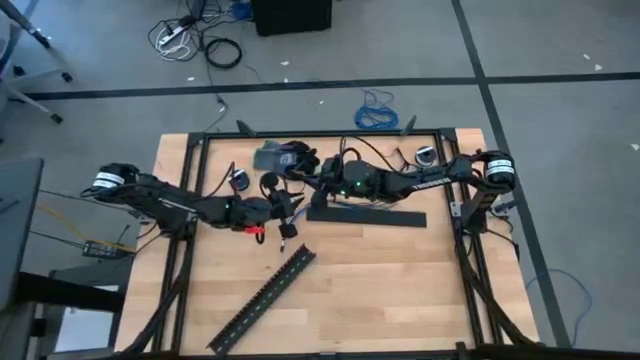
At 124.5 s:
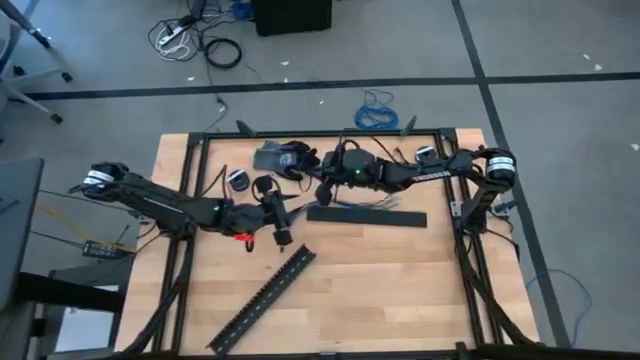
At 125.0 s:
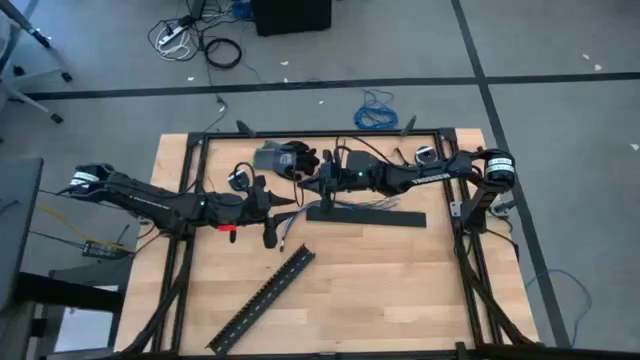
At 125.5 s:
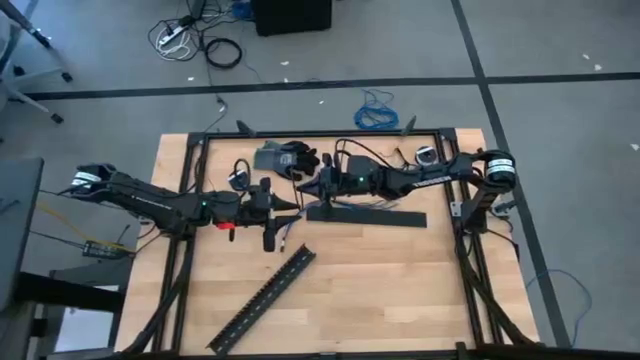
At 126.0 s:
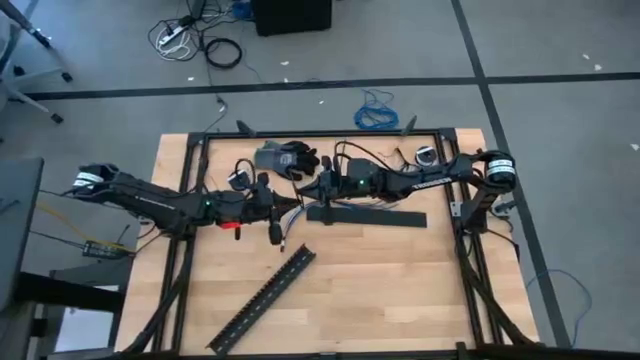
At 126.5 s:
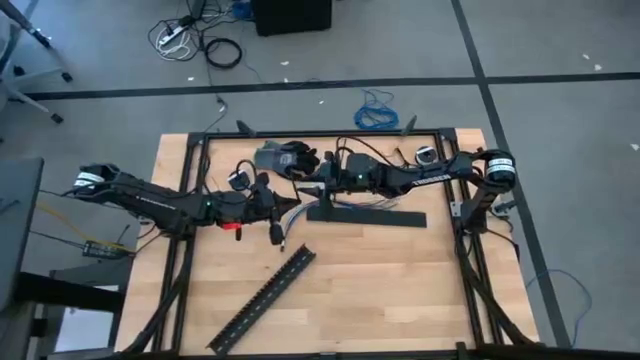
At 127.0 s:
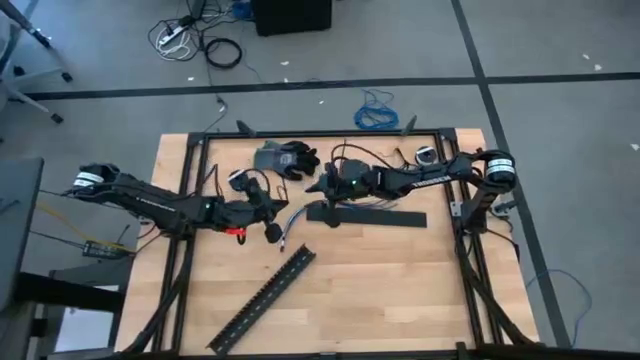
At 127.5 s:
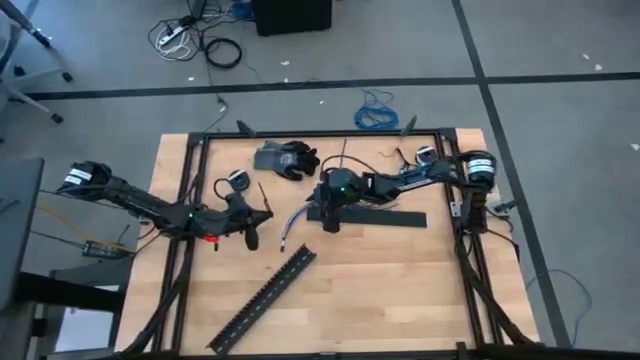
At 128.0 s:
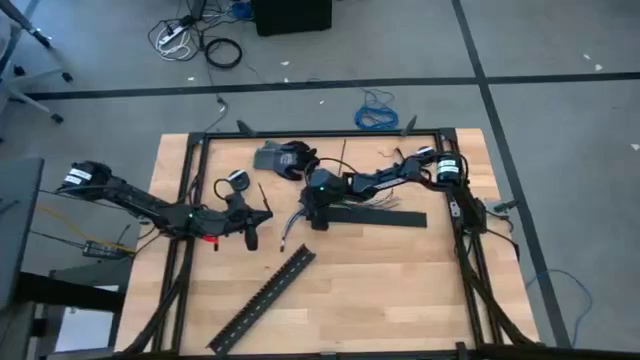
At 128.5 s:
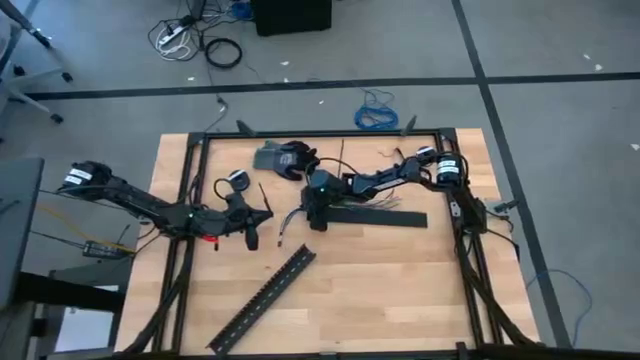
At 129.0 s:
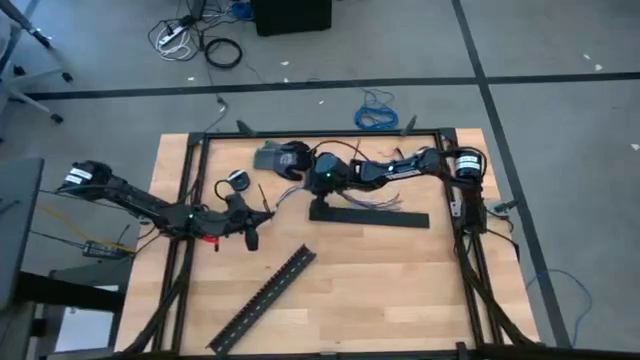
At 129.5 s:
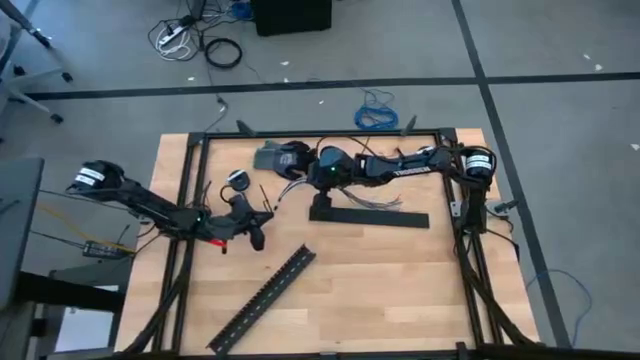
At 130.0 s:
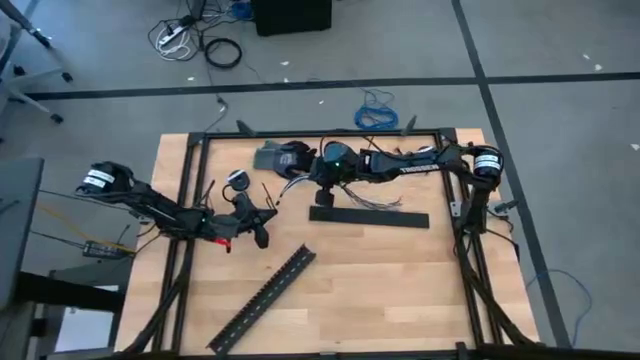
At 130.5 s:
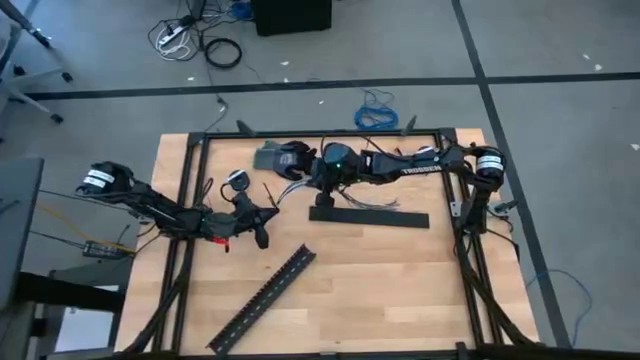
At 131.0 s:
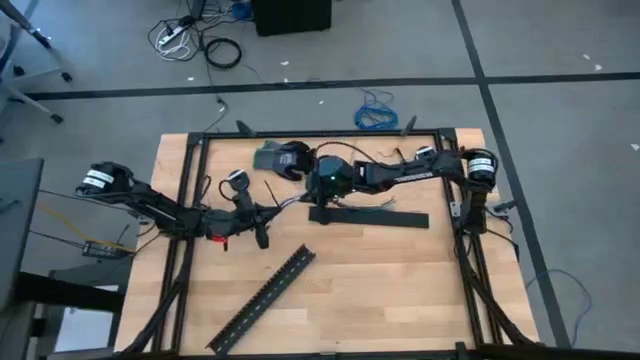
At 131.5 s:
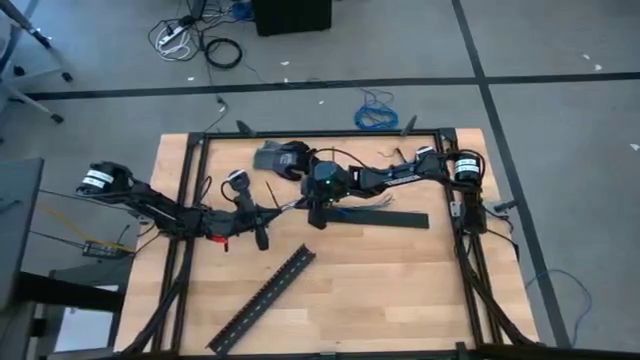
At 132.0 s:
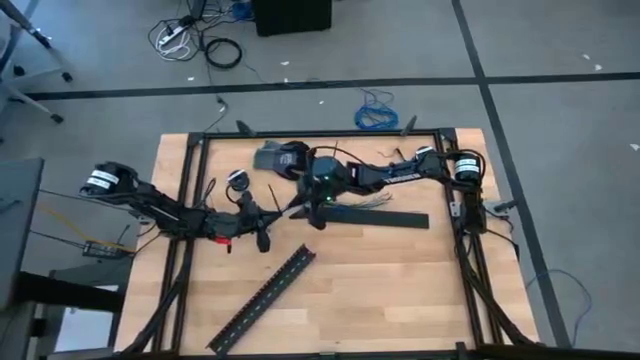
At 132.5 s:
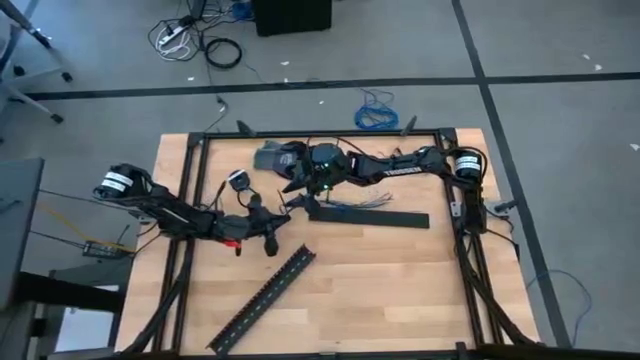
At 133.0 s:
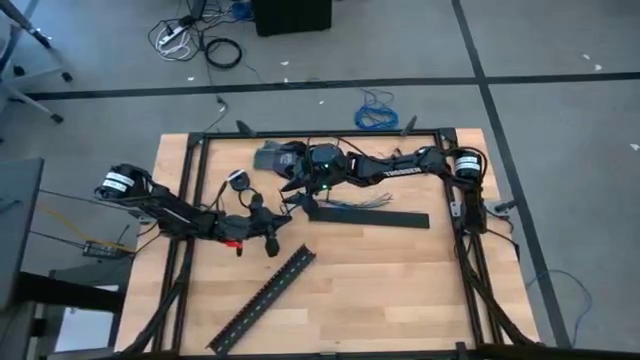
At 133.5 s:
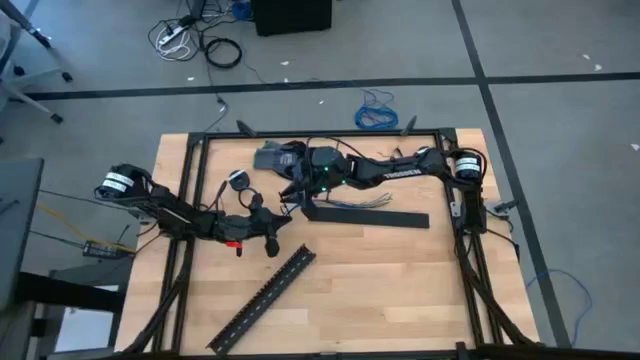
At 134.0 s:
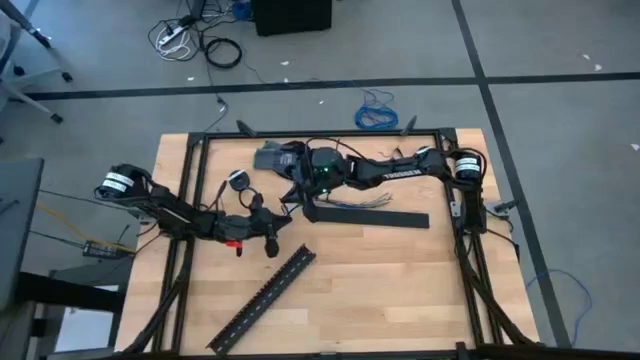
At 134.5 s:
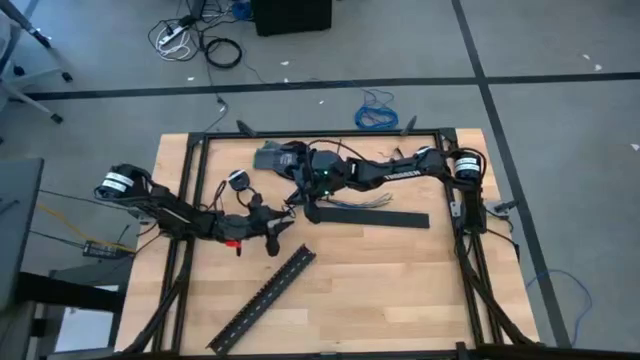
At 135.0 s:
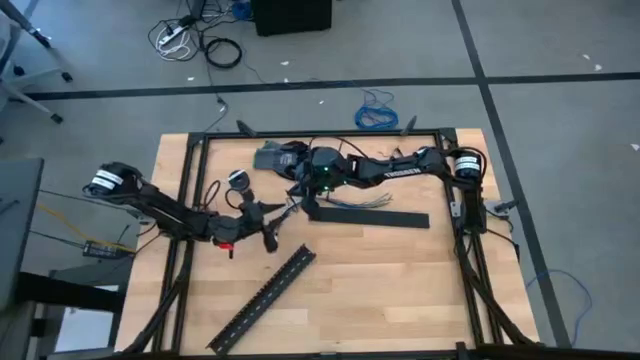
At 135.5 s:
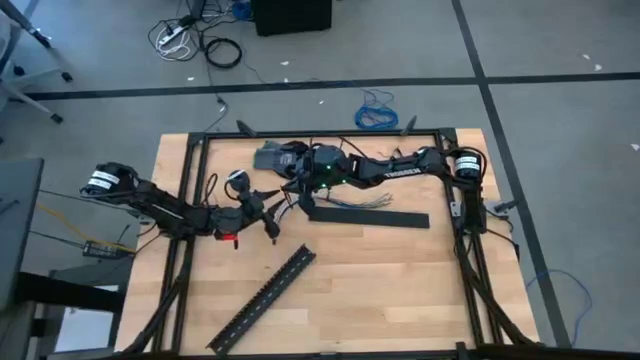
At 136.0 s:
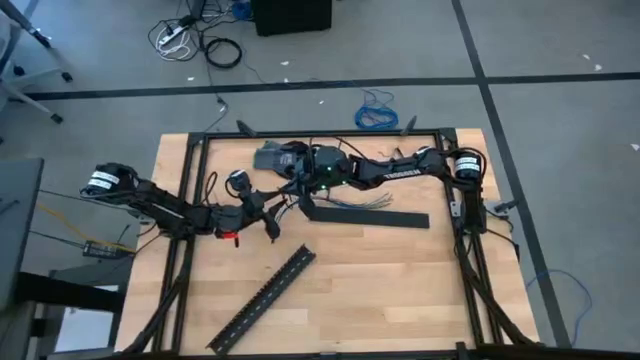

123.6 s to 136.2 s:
Task: Ziptie cables
Wrap the cable wires with the black zip tie

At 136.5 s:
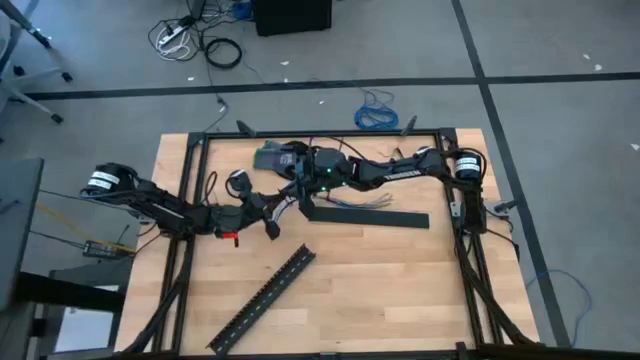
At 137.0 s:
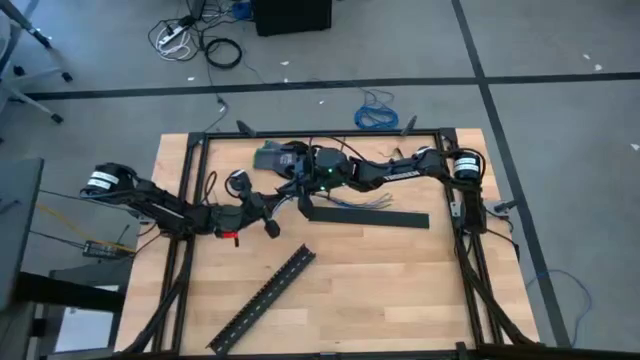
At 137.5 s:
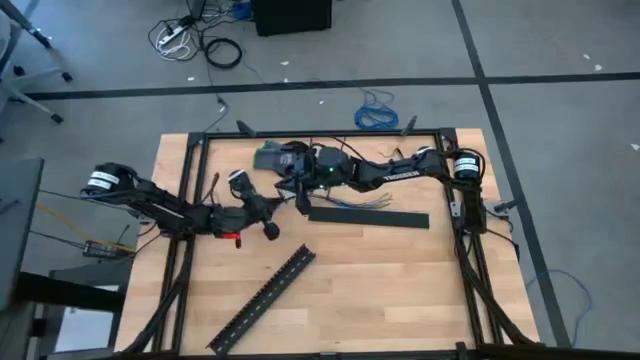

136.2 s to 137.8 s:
Wrap the cable wires with the black zip tie

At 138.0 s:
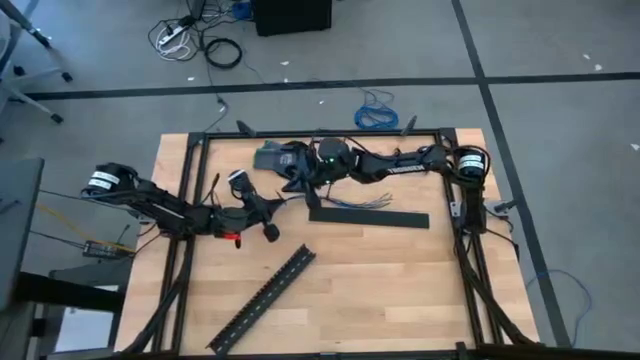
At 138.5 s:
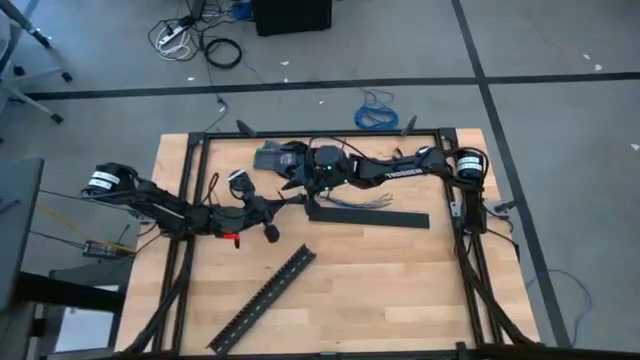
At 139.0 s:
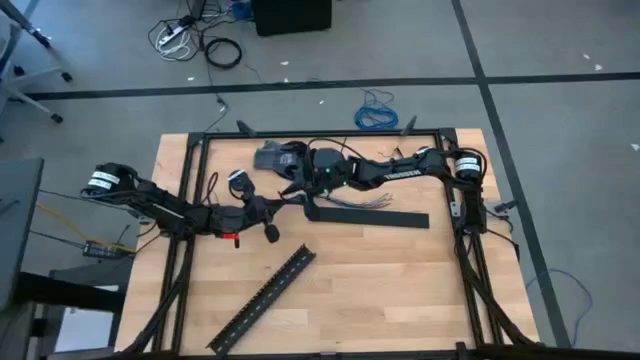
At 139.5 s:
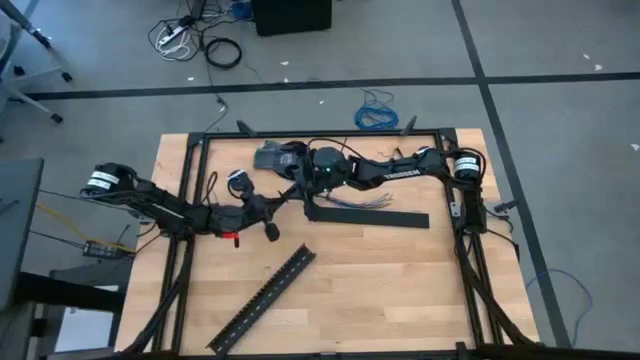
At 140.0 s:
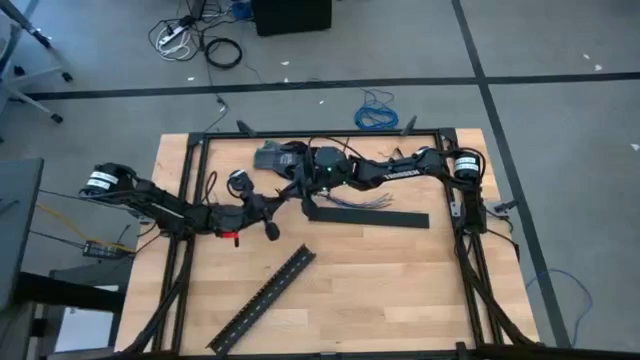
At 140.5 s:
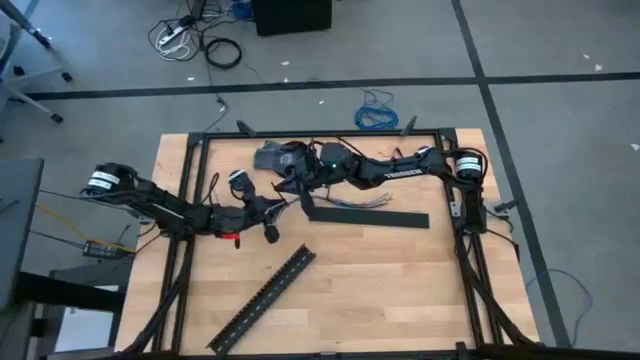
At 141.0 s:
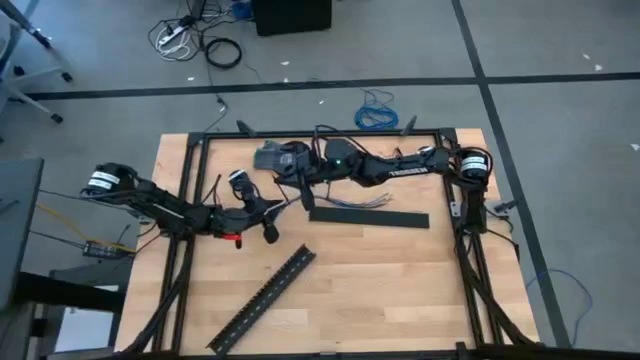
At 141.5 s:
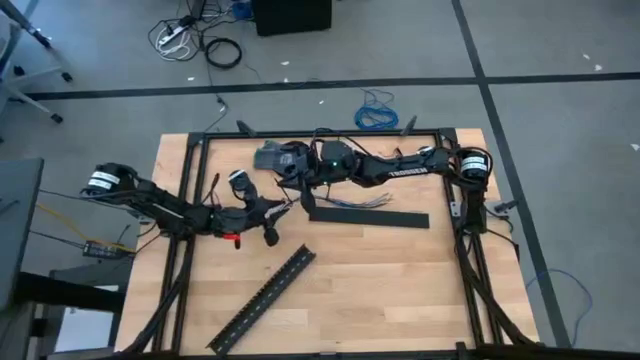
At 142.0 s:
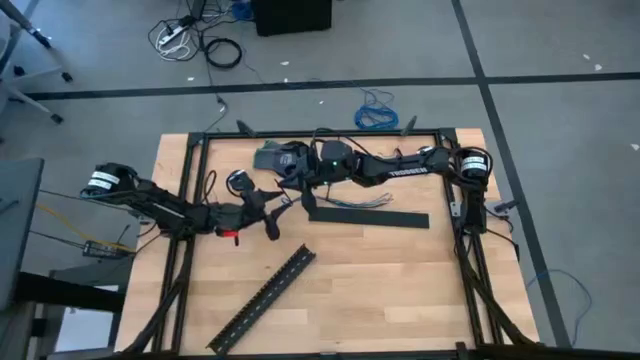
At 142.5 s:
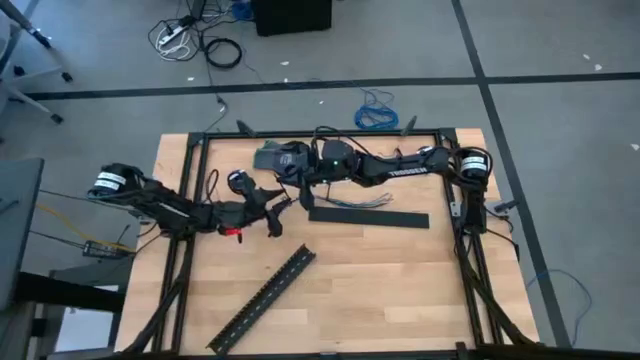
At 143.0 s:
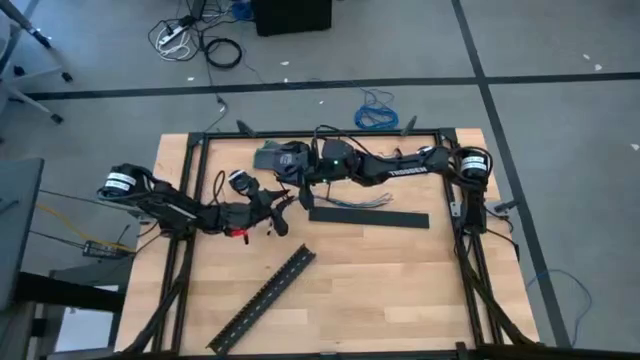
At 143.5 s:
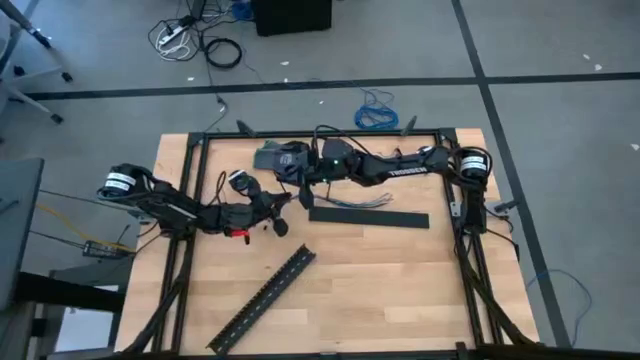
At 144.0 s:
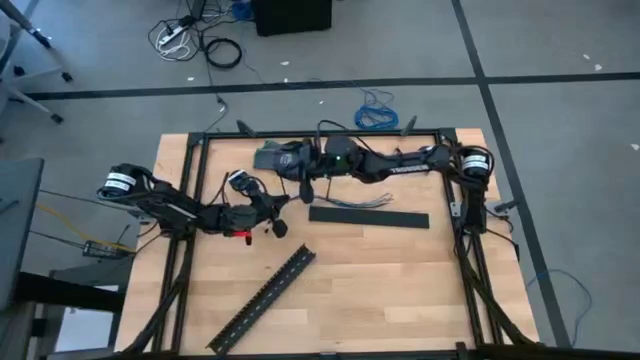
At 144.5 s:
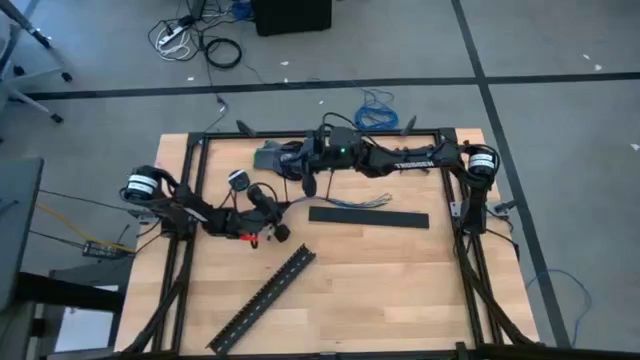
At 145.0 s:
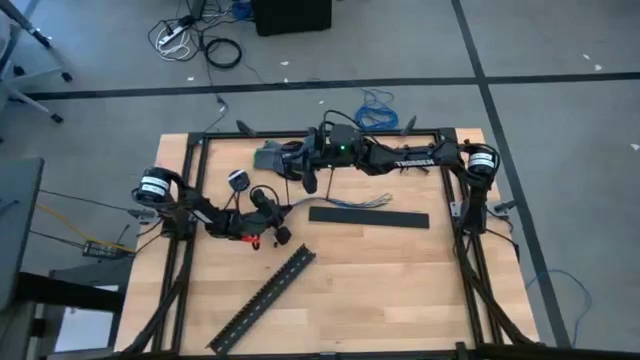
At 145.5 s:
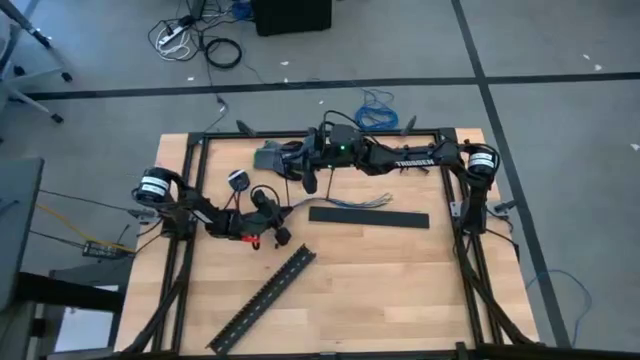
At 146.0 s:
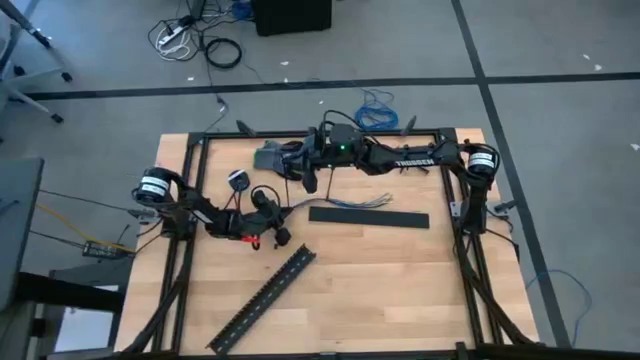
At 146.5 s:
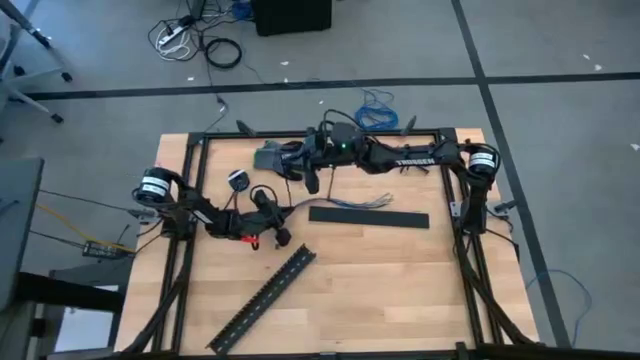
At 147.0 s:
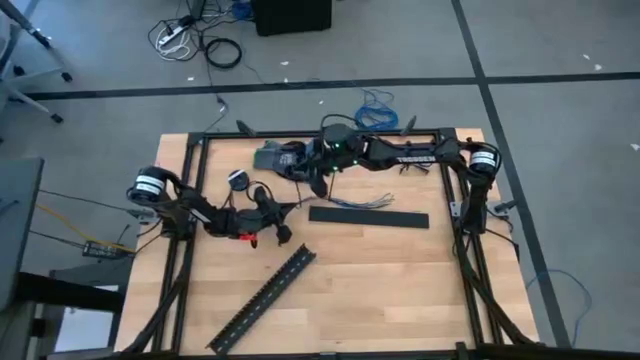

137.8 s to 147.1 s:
Wrap the cable wires with the black zip tie
